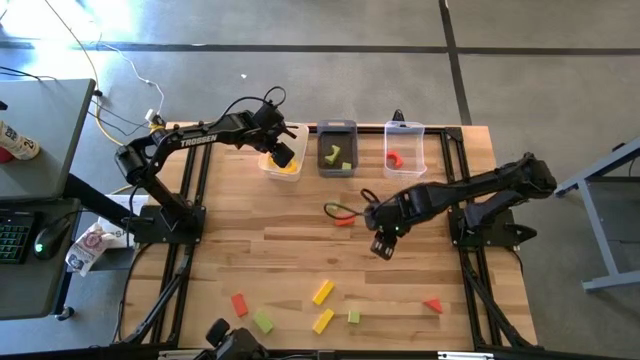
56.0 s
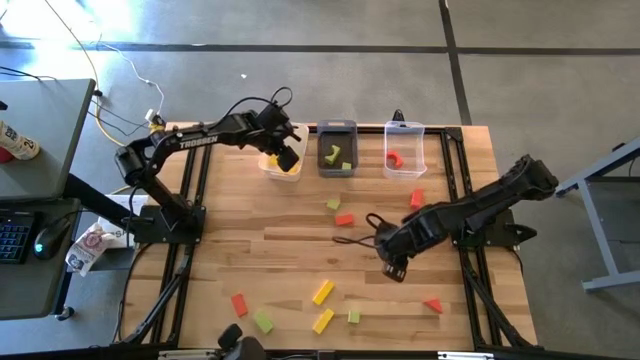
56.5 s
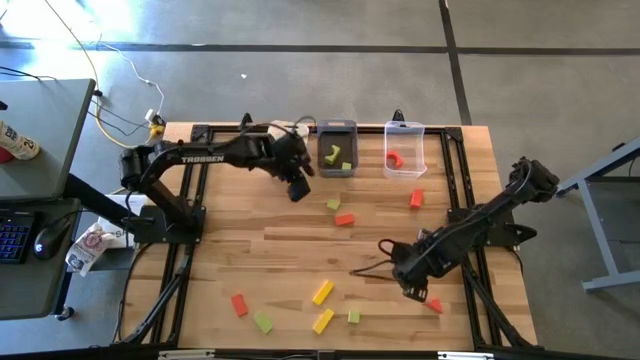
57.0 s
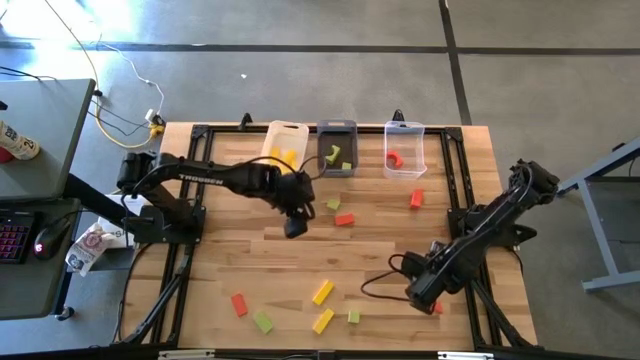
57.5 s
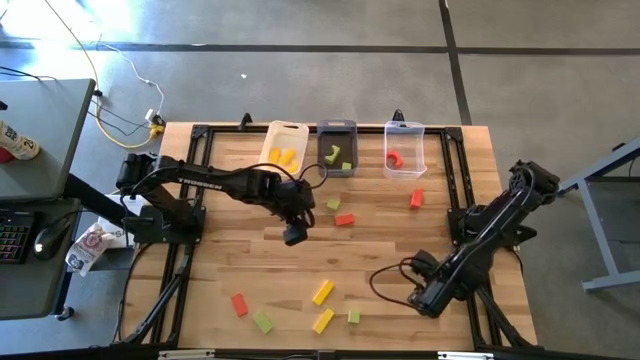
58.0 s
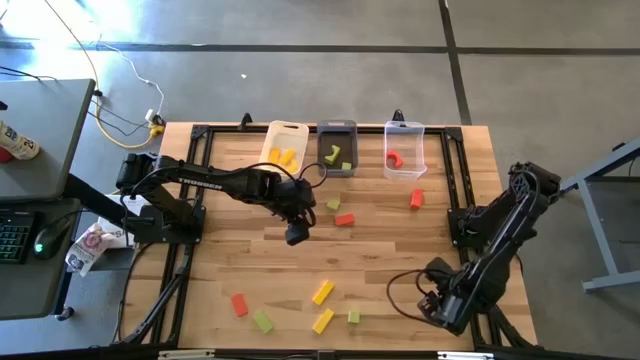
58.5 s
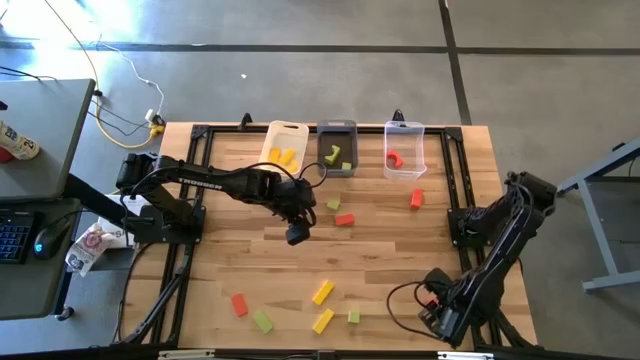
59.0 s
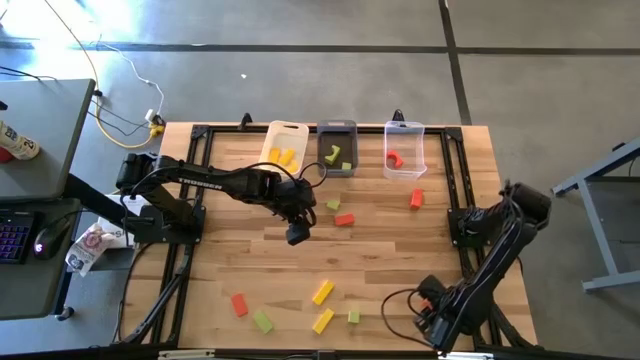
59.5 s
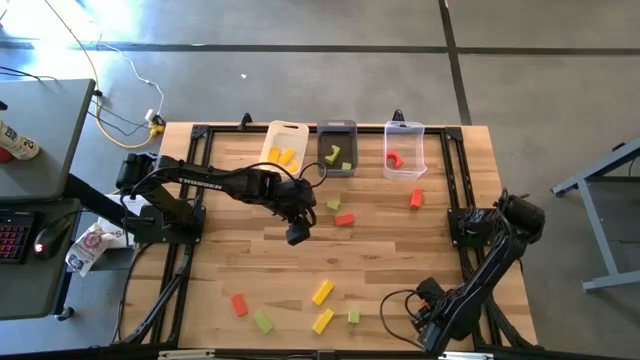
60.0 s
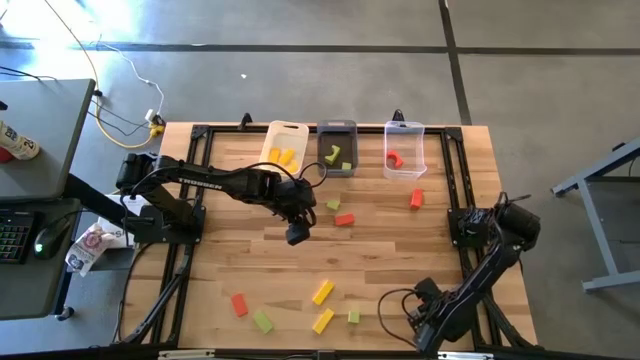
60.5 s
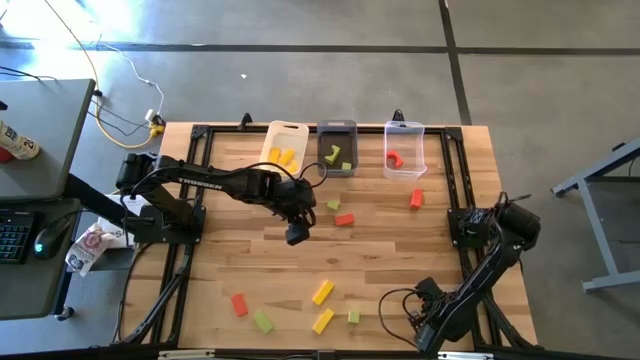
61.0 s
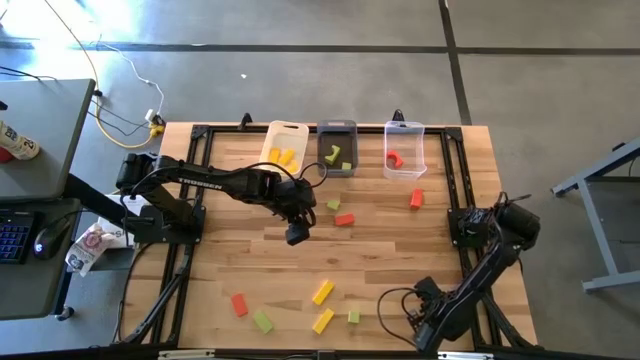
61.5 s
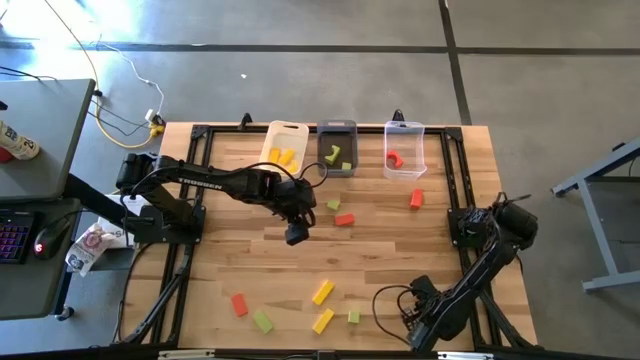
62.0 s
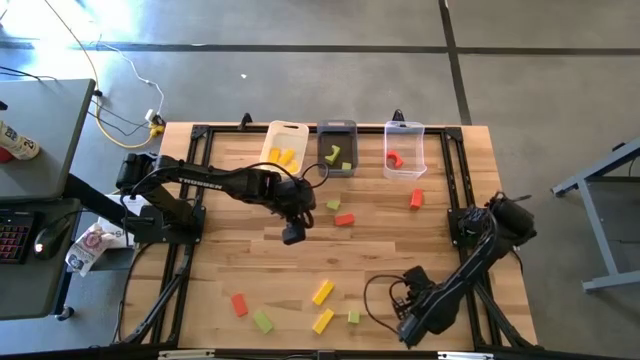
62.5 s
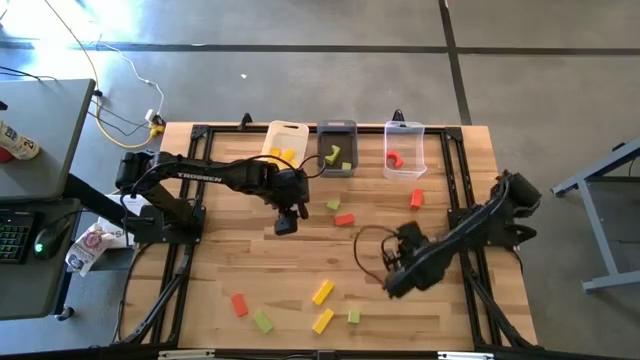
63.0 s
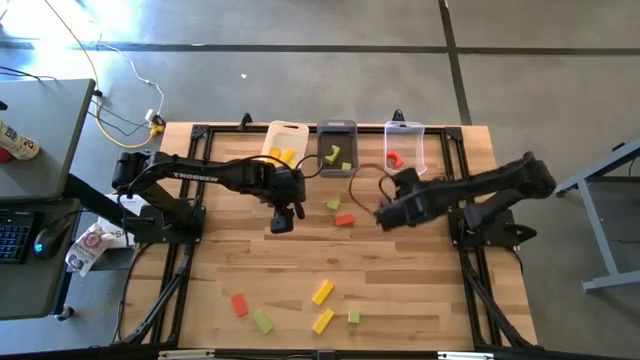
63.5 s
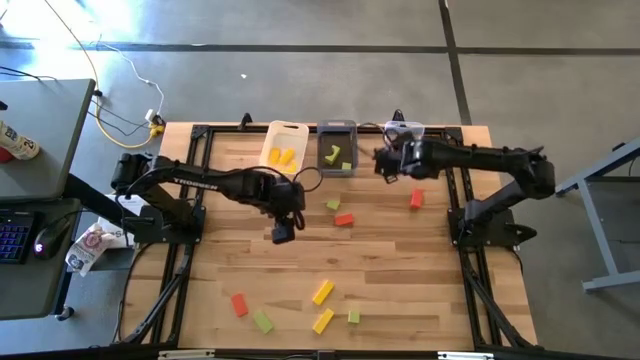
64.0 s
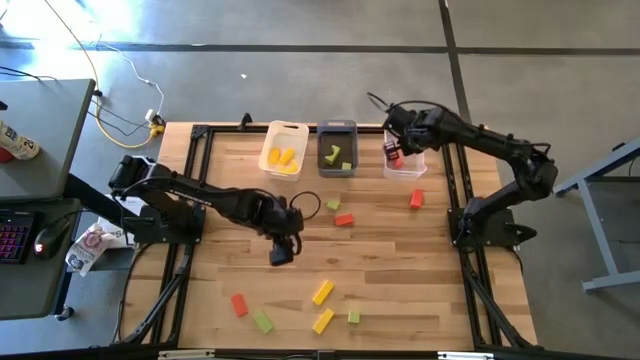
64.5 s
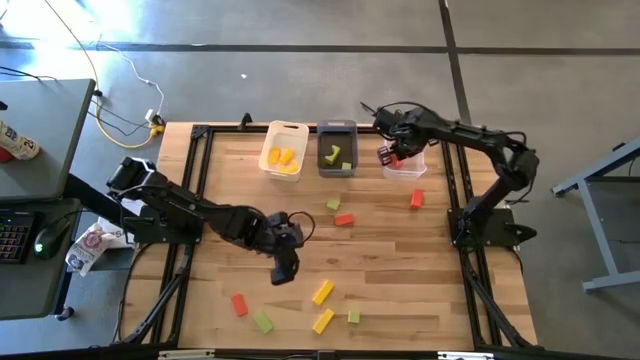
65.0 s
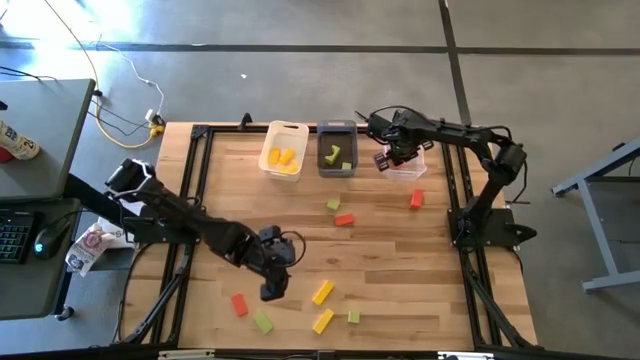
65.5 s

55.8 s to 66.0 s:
Task: Sort & place blocks by color
Put the orange block into the transparent bin

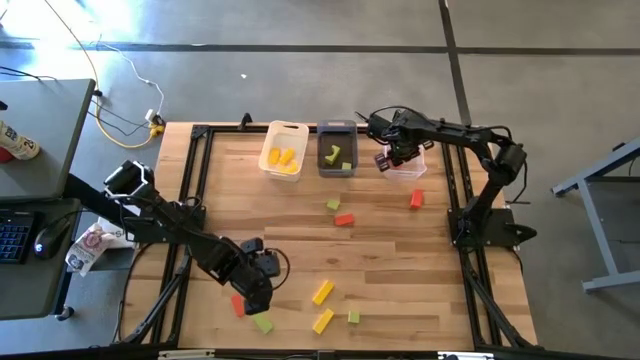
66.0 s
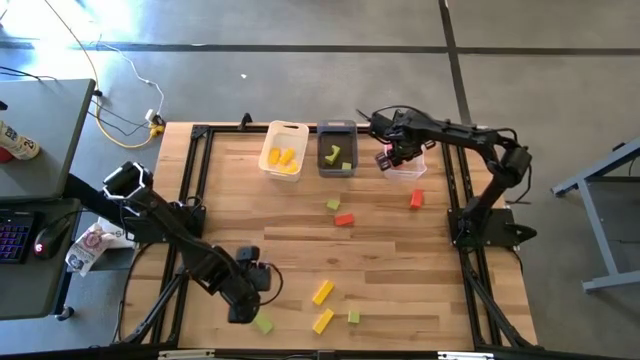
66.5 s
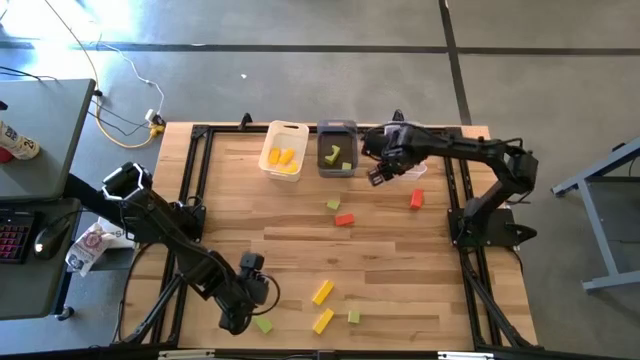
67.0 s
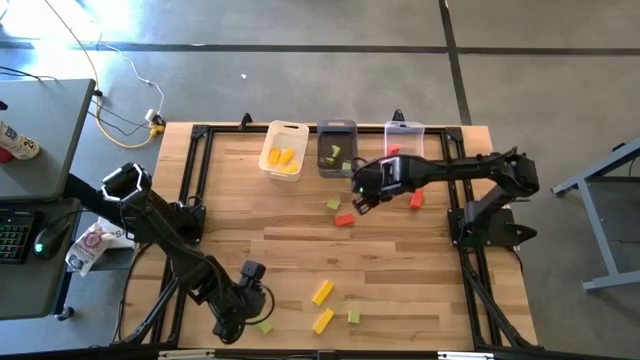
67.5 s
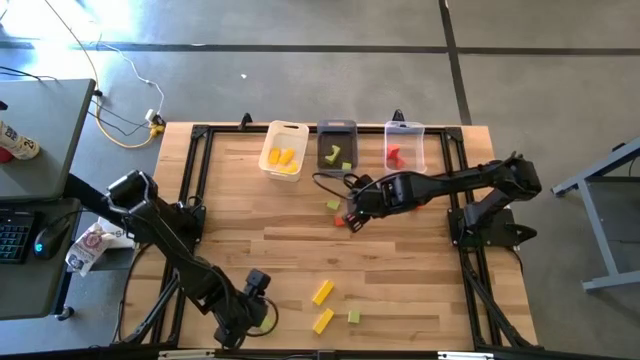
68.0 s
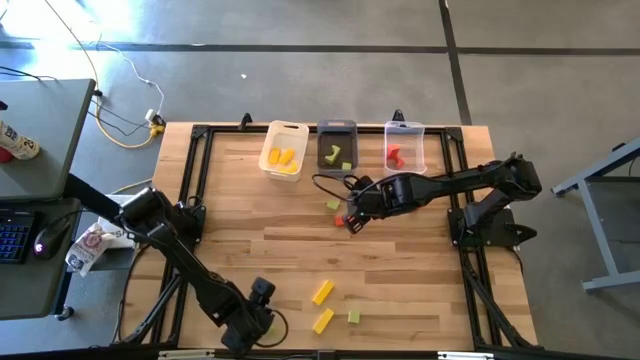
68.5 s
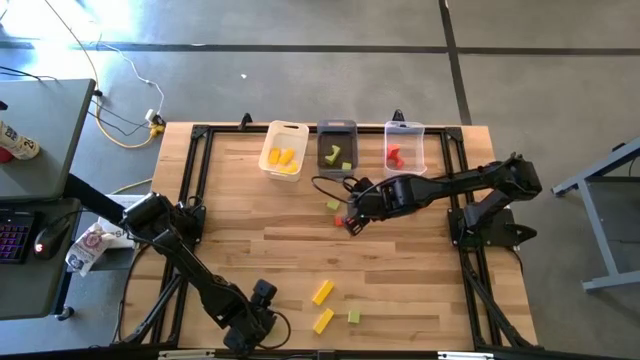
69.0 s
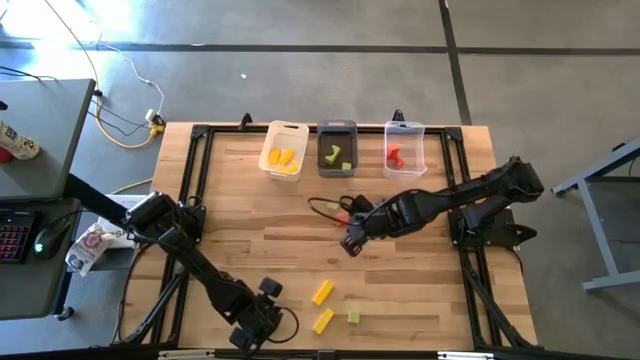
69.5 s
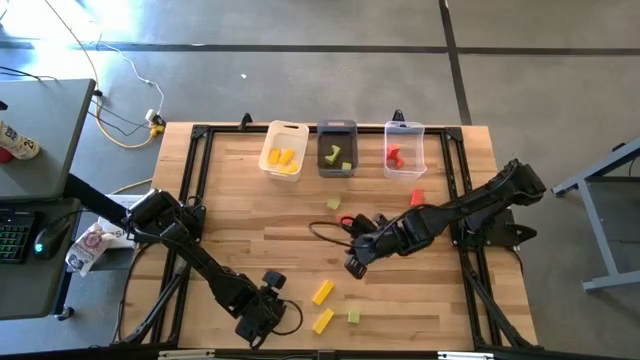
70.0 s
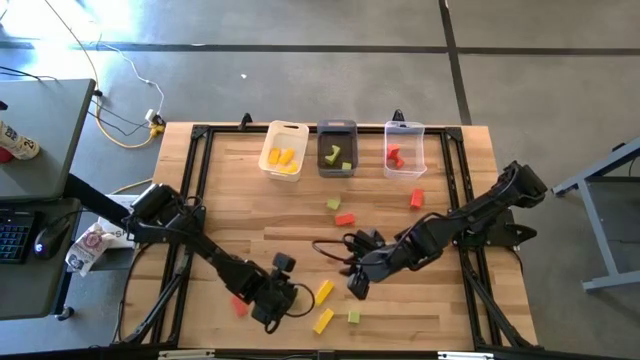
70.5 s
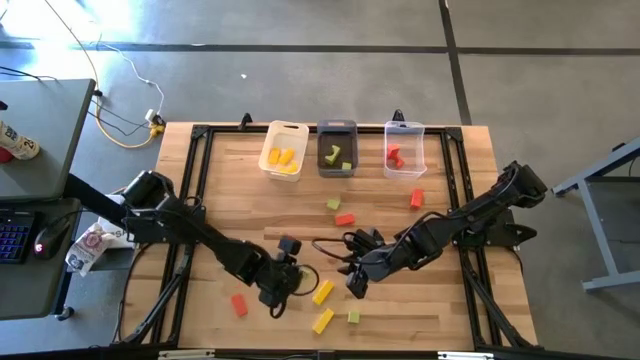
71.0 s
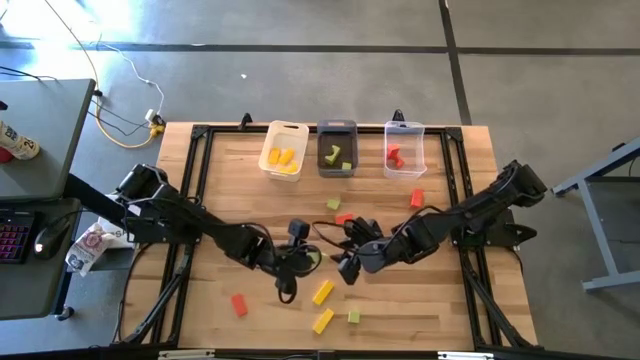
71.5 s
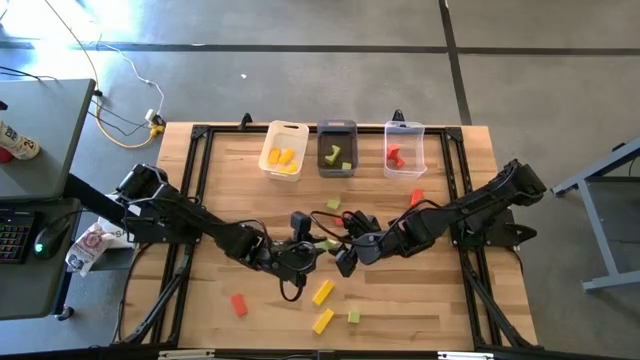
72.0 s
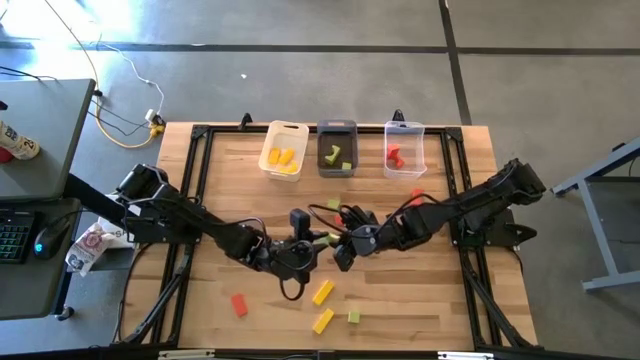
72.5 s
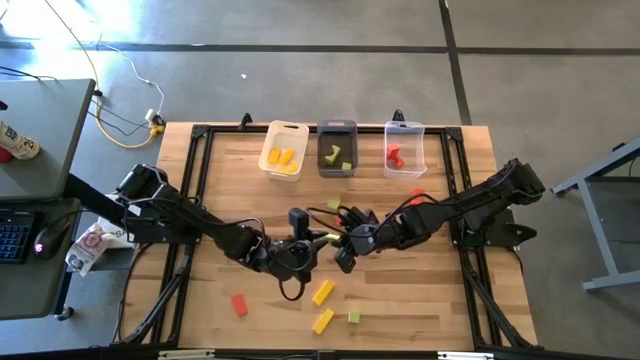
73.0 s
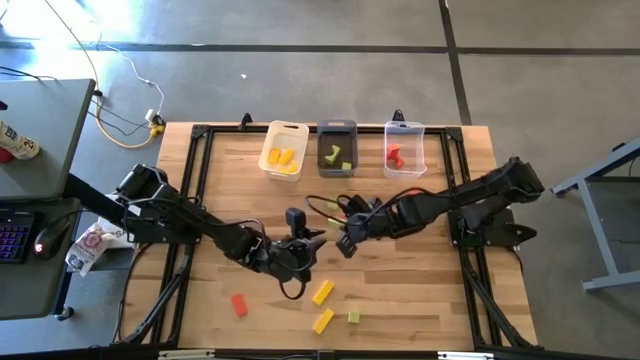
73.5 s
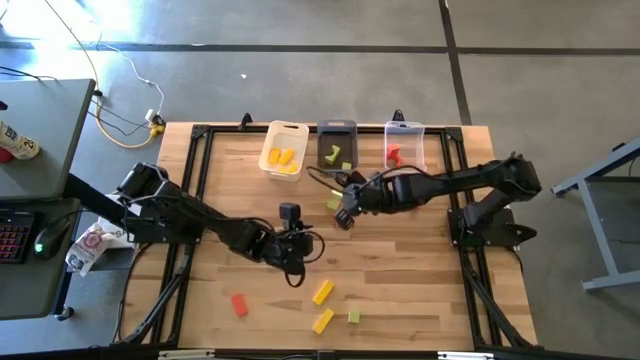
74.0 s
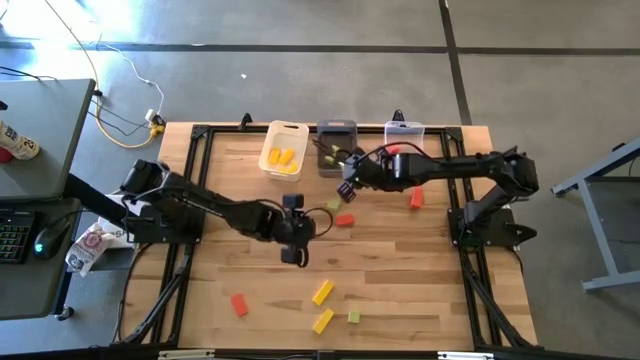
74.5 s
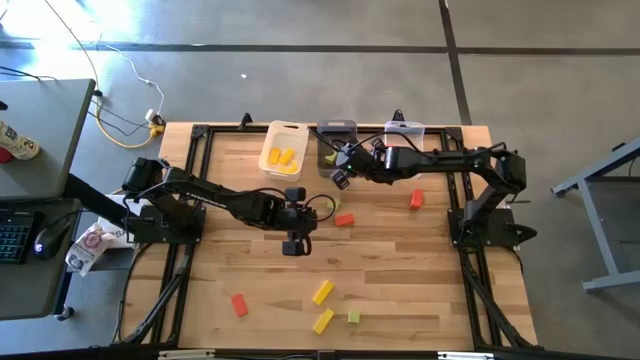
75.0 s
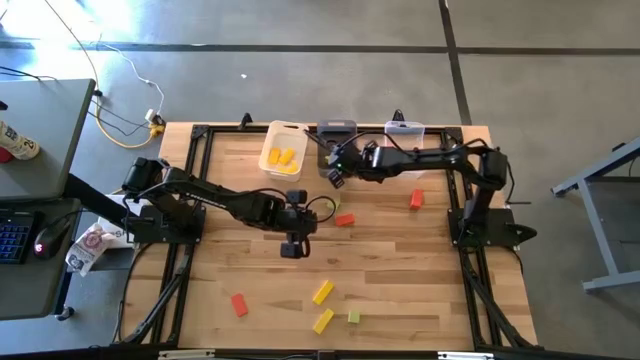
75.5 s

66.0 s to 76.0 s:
Put the green block into the black bin
